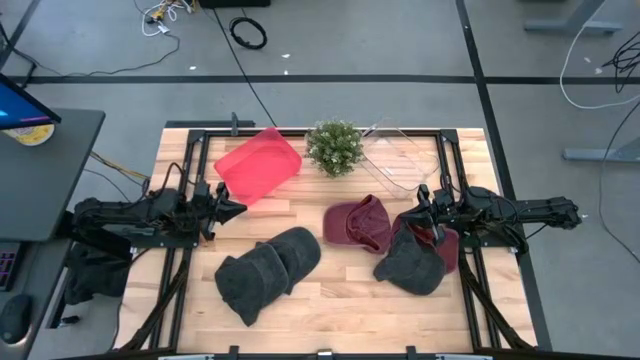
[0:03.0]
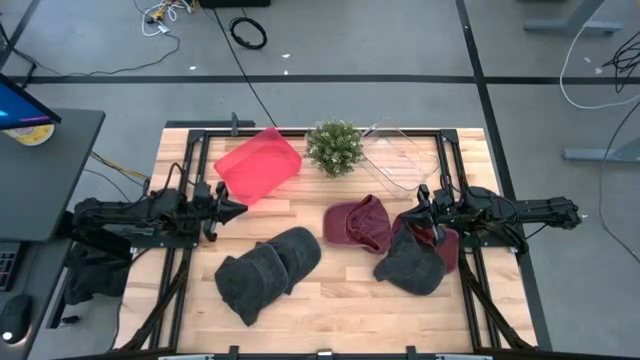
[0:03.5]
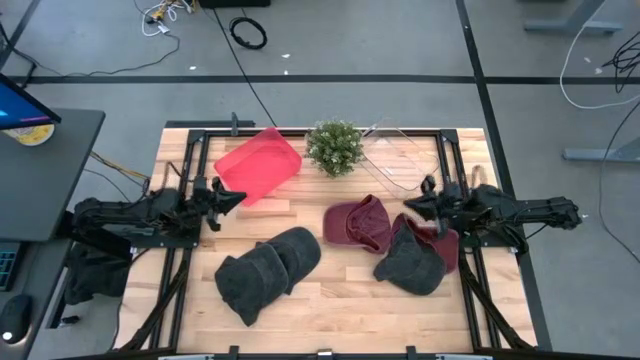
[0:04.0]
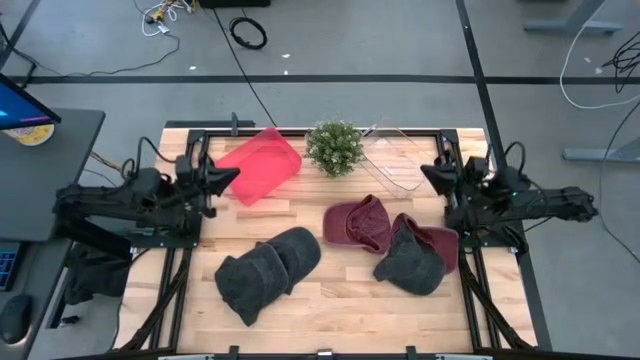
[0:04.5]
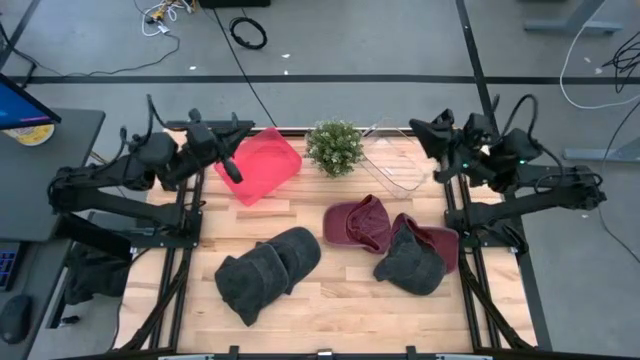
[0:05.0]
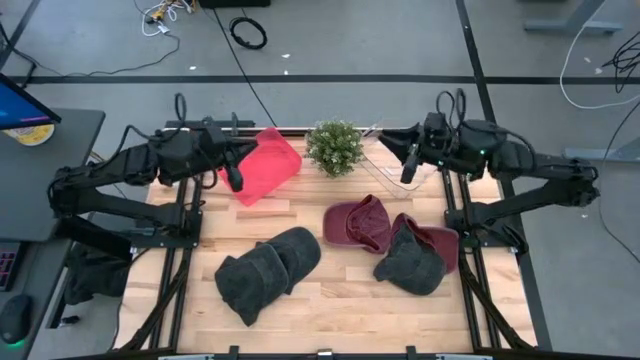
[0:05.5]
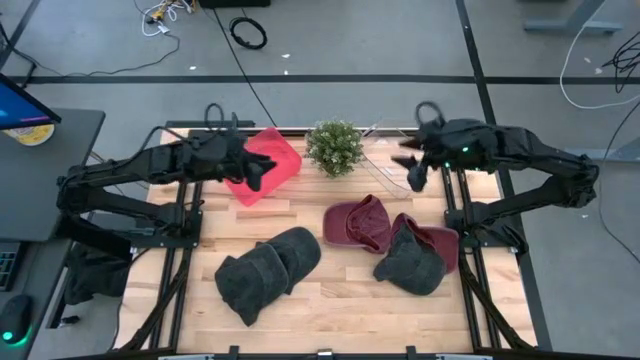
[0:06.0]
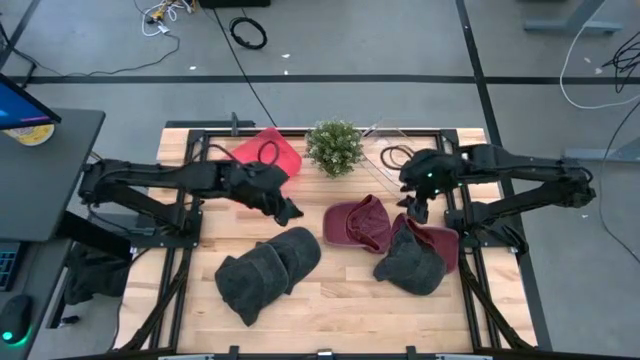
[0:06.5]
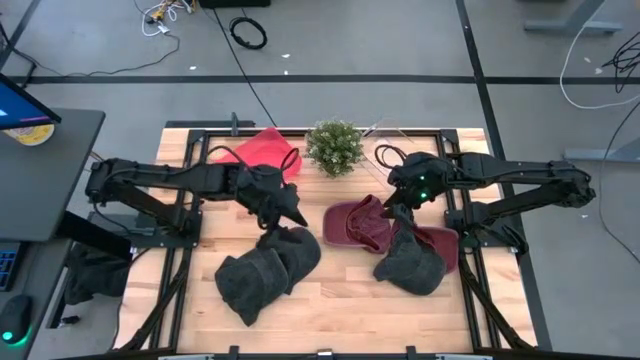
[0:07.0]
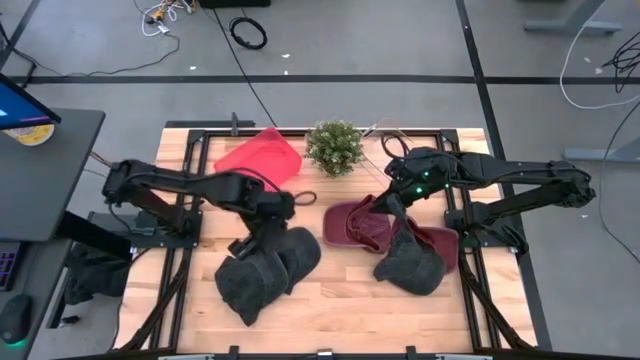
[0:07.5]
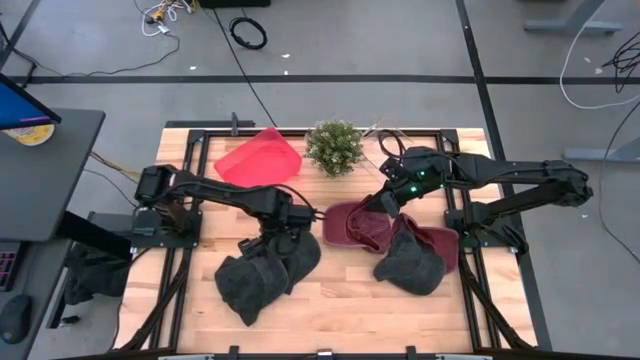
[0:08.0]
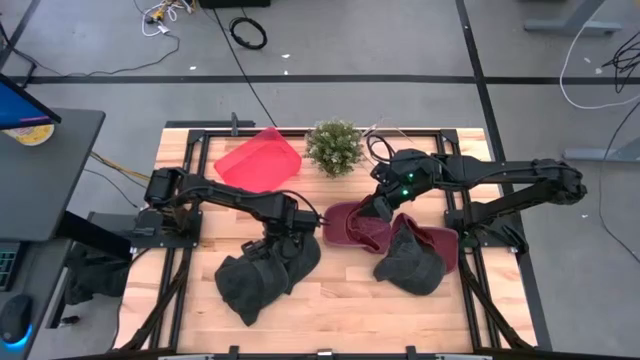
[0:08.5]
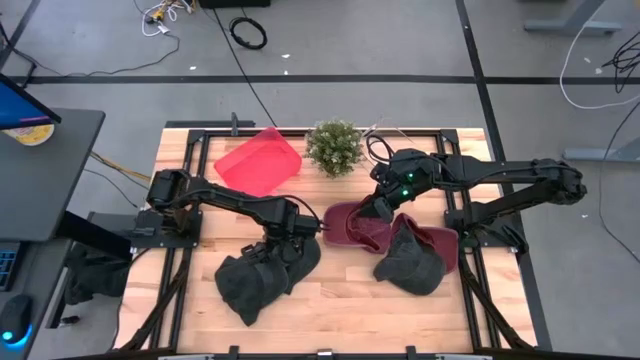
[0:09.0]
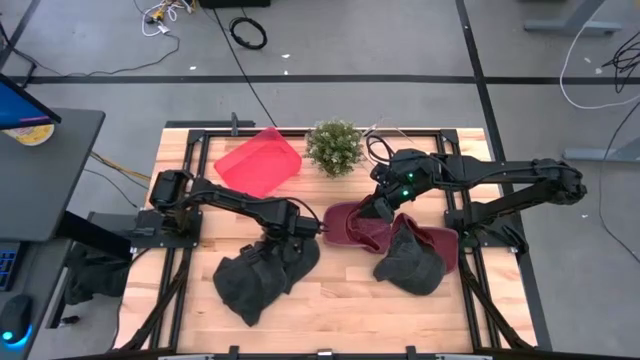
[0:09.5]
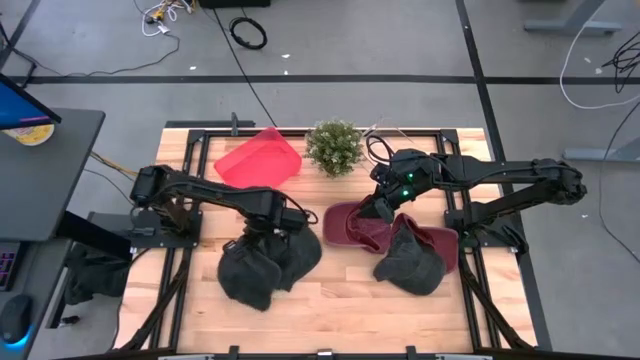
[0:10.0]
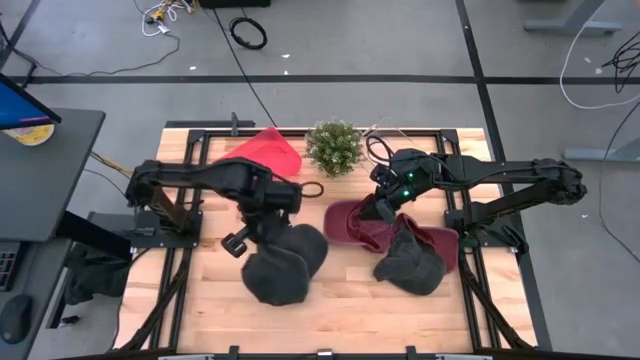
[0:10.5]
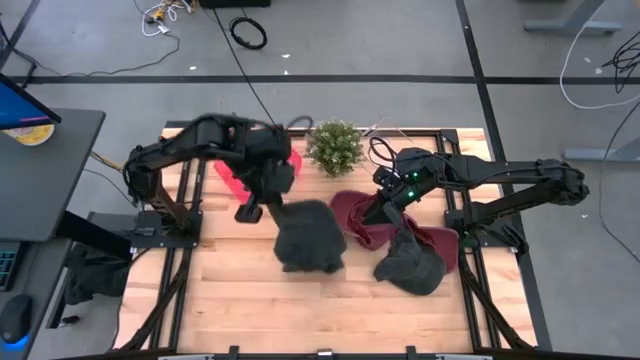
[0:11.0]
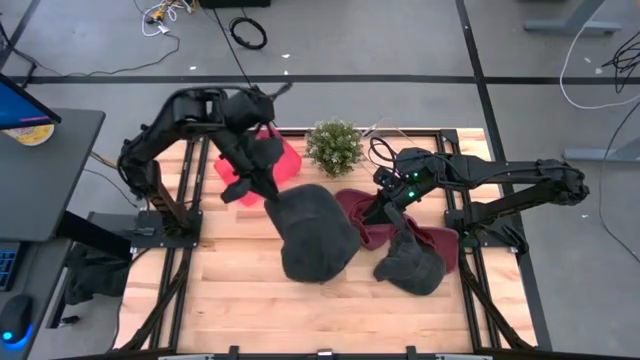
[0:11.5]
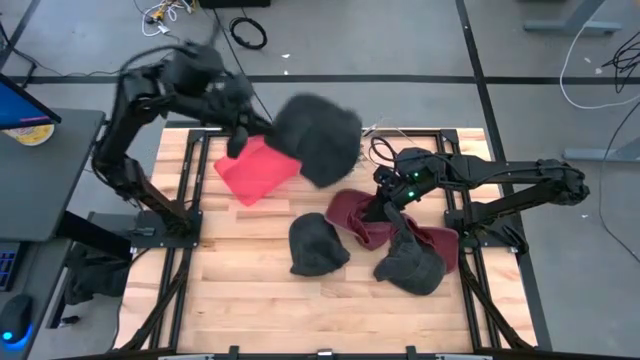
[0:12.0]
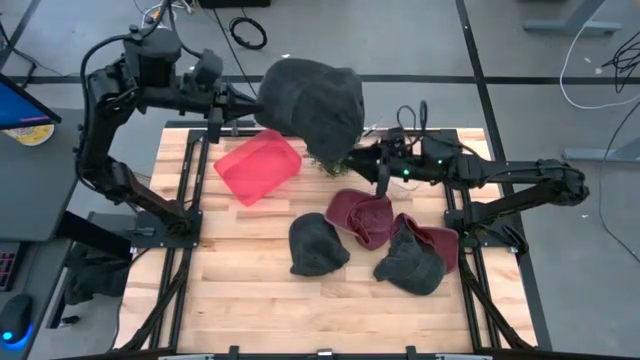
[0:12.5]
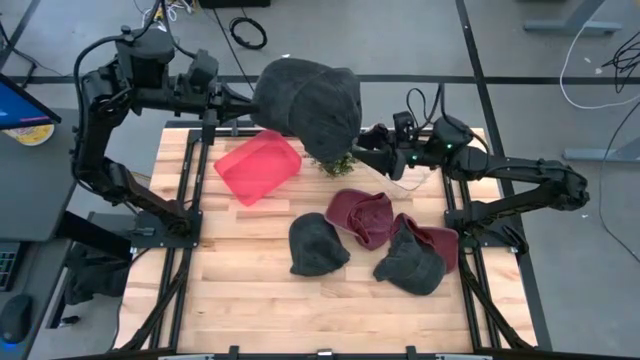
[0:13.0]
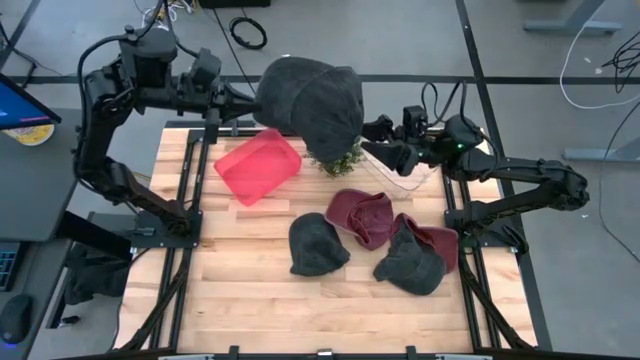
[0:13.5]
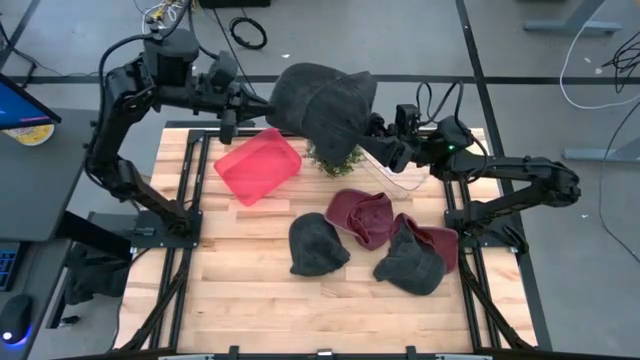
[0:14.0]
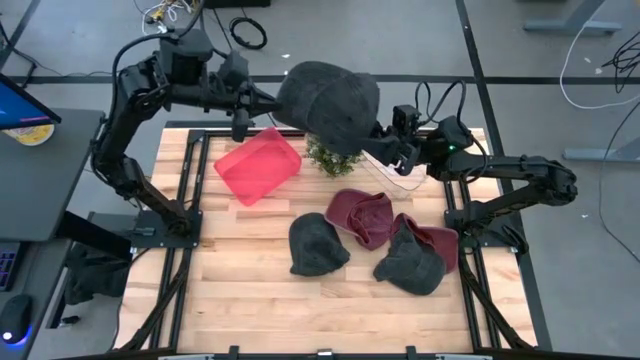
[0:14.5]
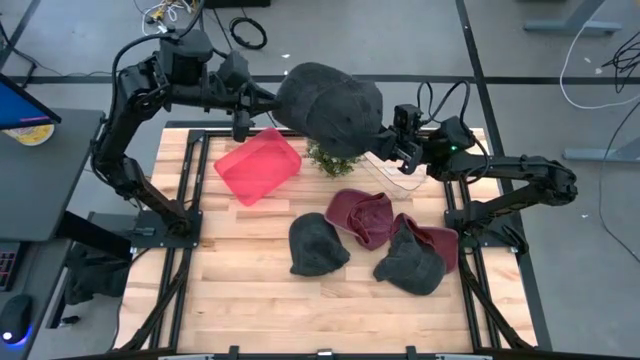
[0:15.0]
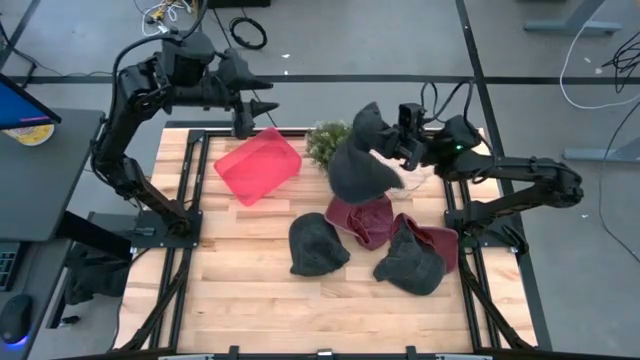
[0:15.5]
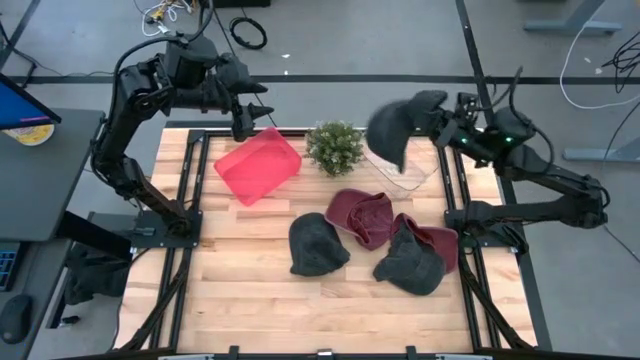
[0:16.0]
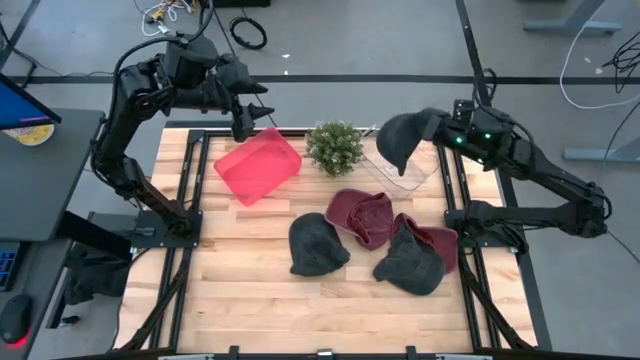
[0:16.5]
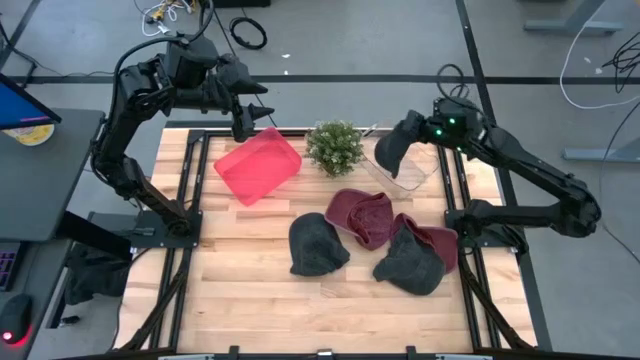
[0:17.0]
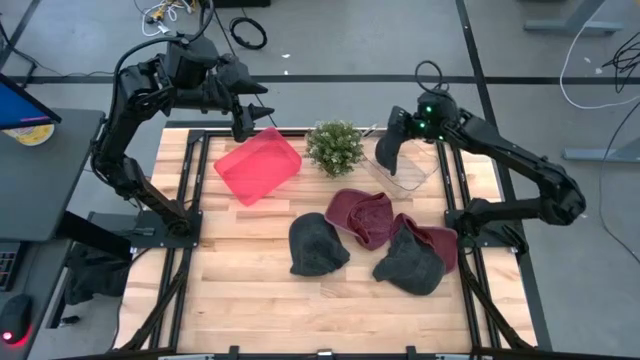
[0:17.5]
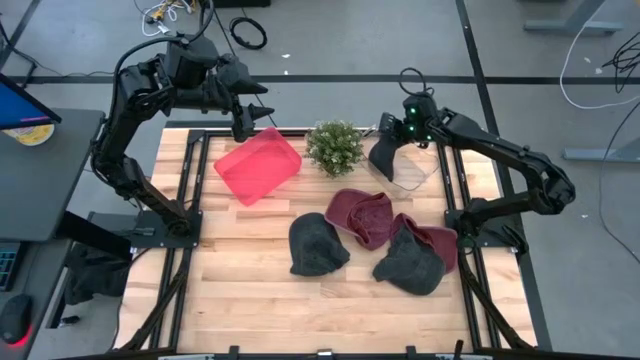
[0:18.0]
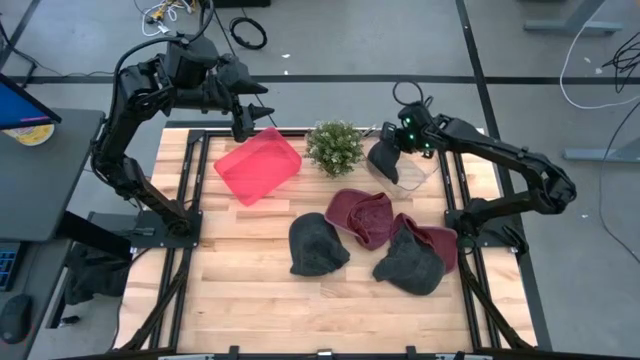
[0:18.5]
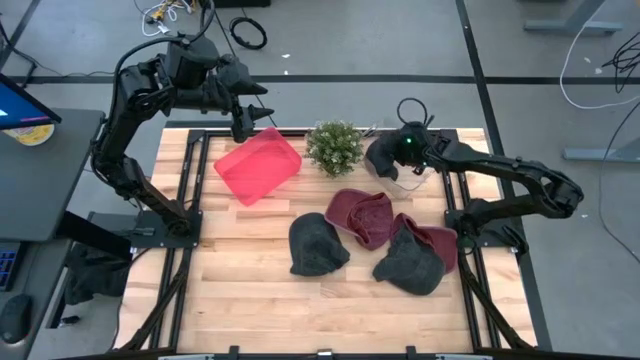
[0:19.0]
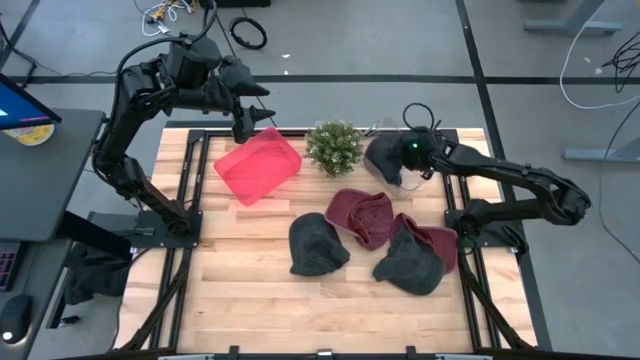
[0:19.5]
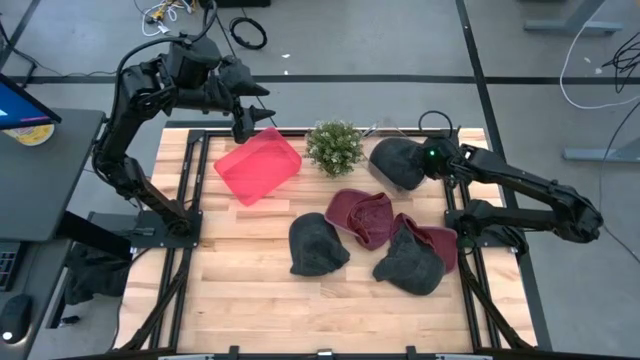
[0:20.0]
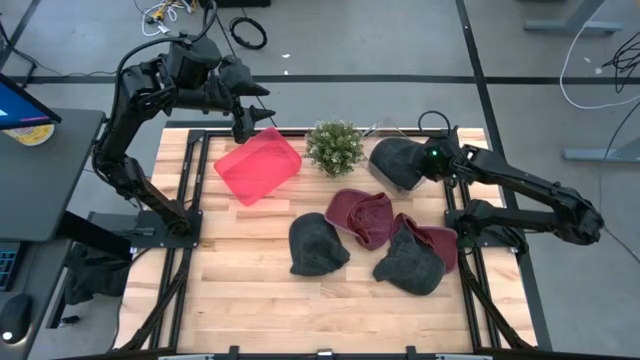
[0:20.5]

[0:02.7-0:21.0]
Task: Pick & Place hat
Put the left black cap into the transparent bin
